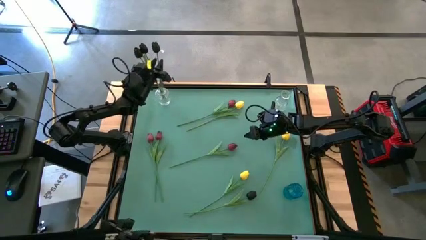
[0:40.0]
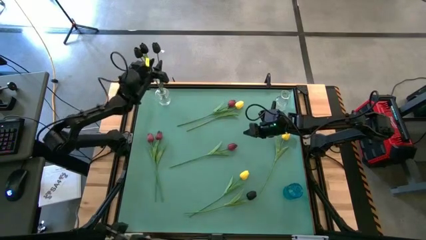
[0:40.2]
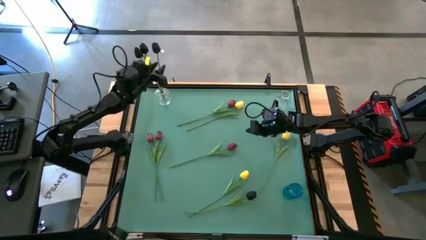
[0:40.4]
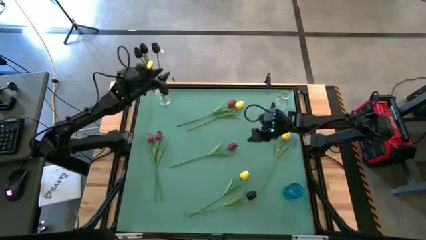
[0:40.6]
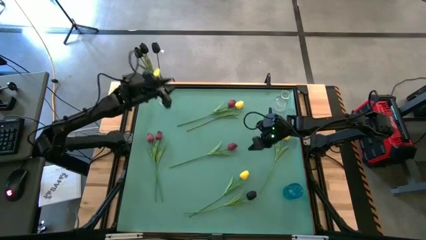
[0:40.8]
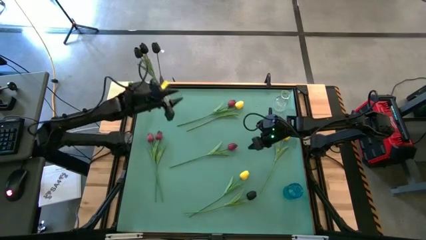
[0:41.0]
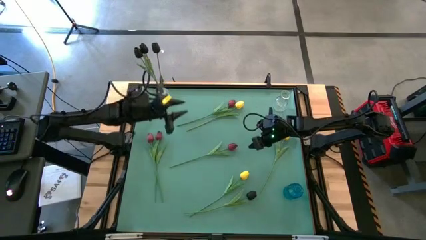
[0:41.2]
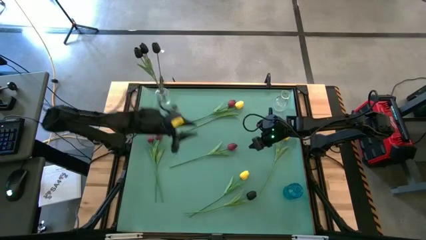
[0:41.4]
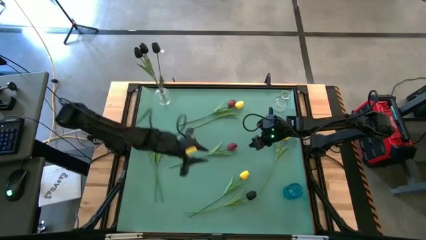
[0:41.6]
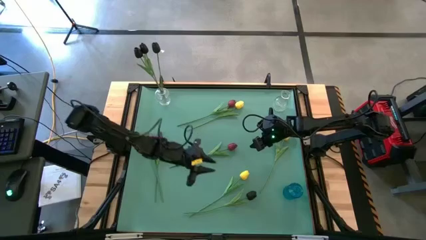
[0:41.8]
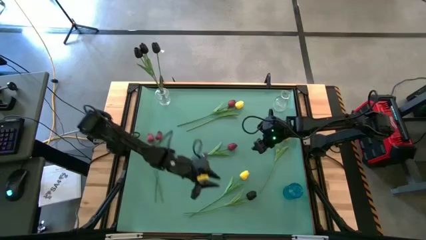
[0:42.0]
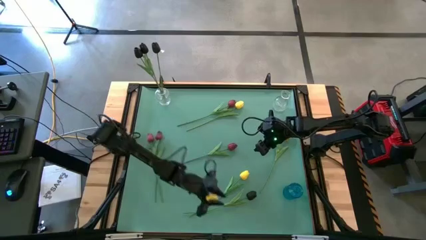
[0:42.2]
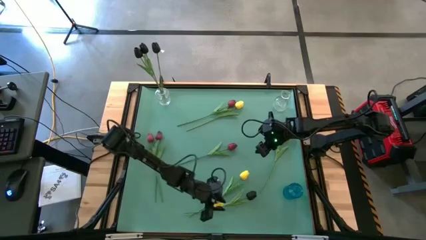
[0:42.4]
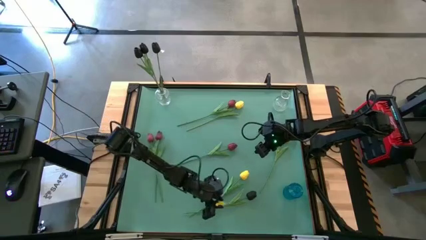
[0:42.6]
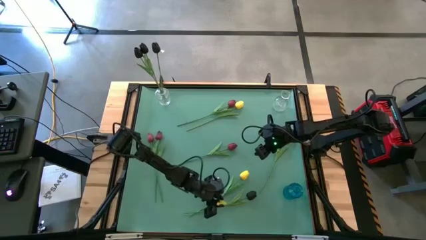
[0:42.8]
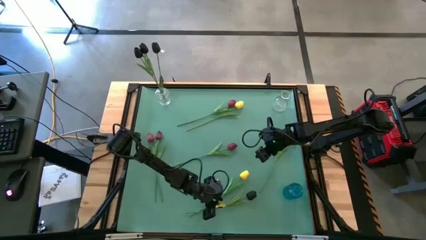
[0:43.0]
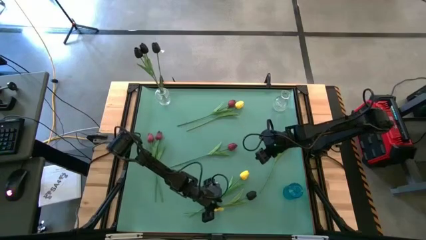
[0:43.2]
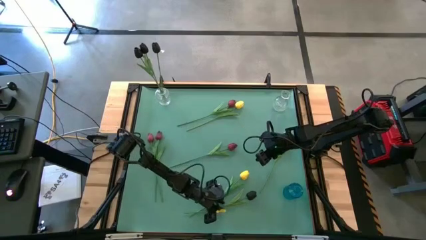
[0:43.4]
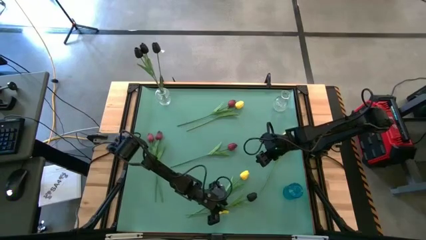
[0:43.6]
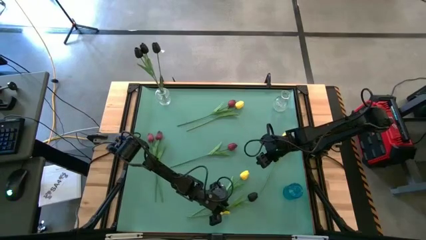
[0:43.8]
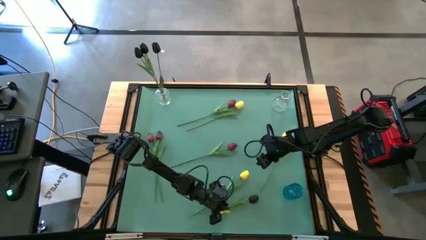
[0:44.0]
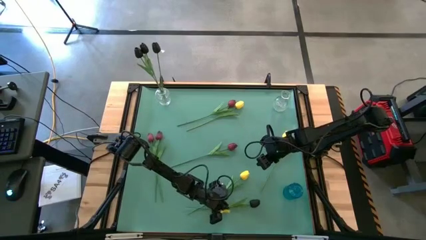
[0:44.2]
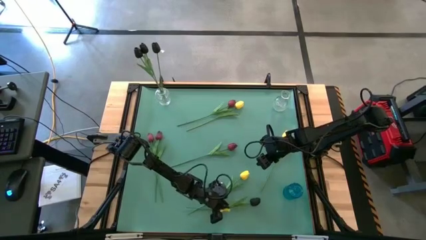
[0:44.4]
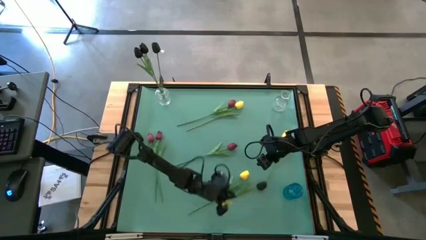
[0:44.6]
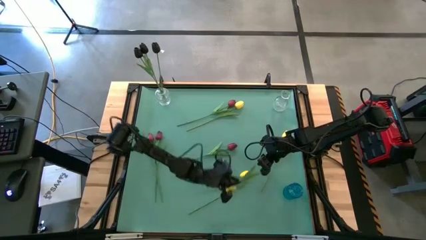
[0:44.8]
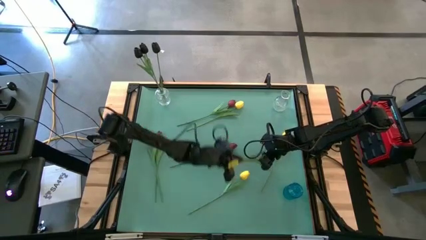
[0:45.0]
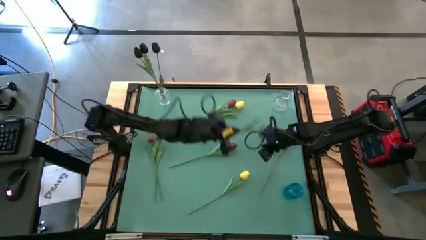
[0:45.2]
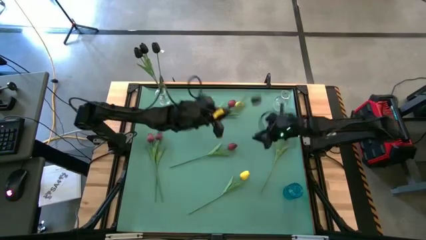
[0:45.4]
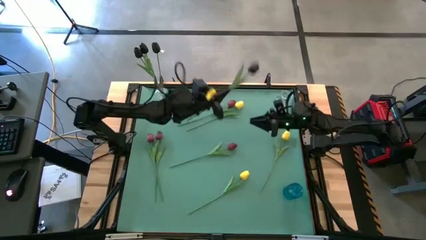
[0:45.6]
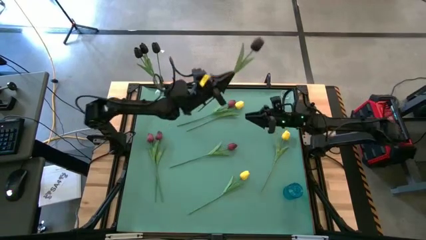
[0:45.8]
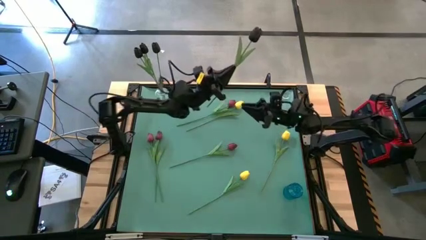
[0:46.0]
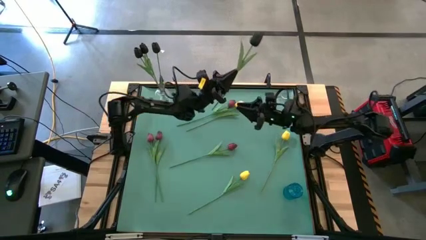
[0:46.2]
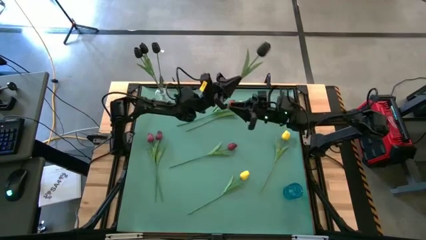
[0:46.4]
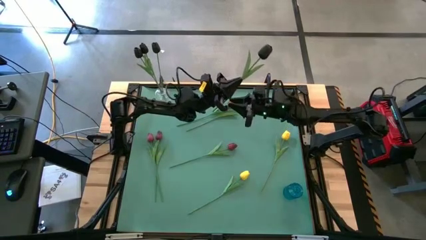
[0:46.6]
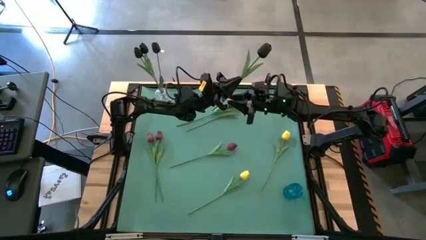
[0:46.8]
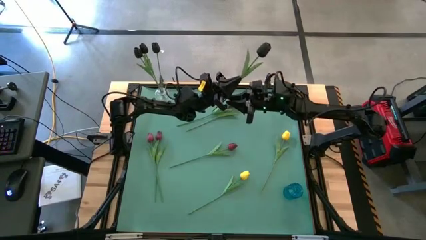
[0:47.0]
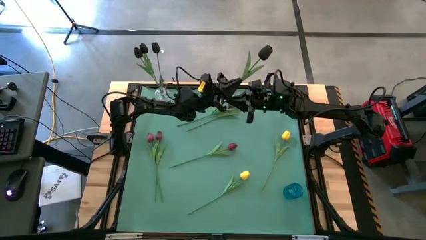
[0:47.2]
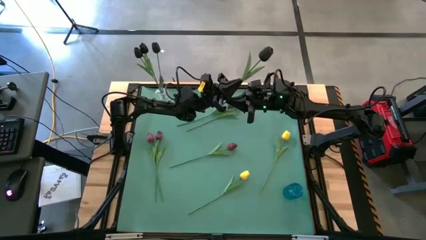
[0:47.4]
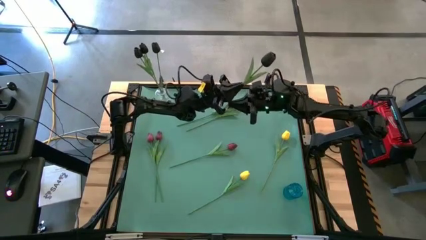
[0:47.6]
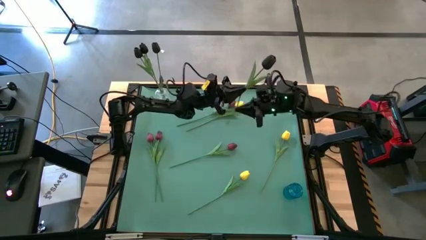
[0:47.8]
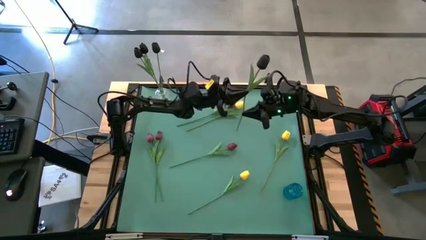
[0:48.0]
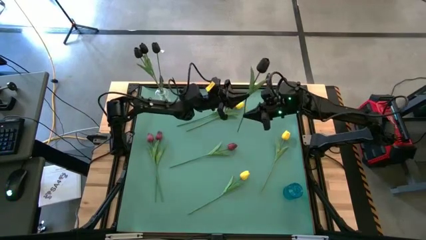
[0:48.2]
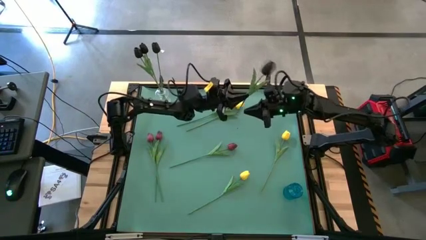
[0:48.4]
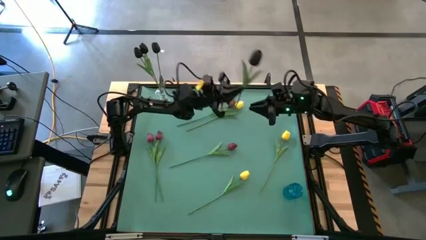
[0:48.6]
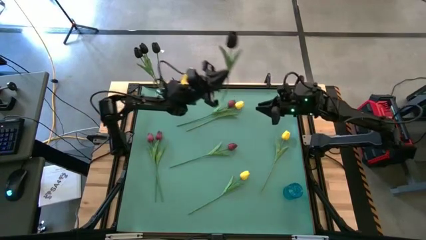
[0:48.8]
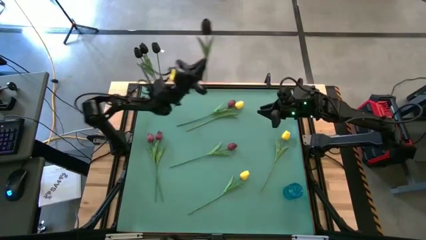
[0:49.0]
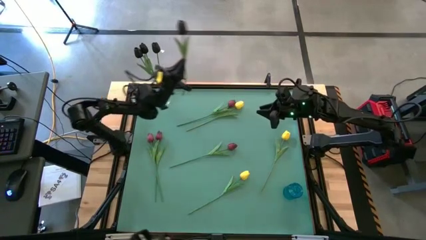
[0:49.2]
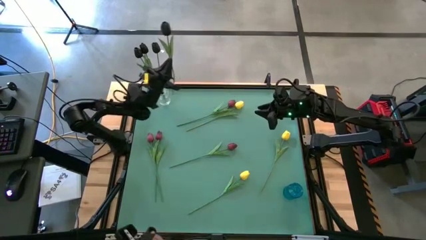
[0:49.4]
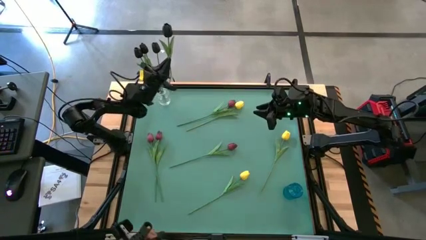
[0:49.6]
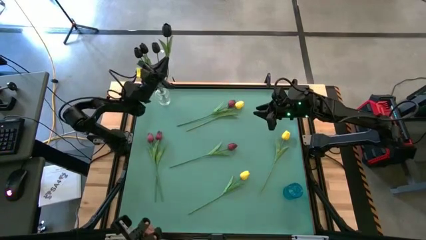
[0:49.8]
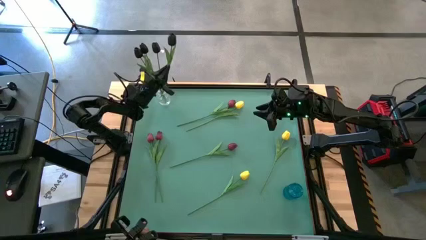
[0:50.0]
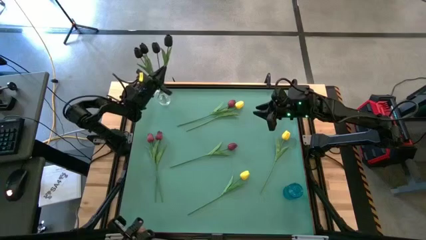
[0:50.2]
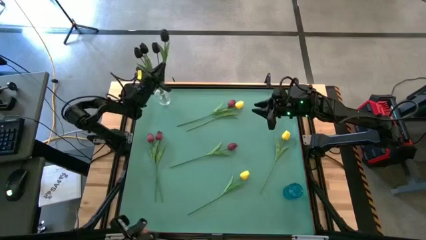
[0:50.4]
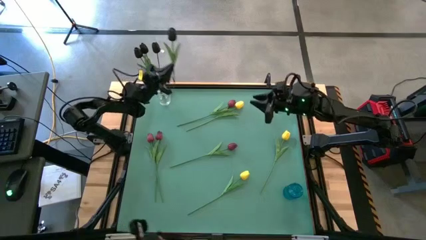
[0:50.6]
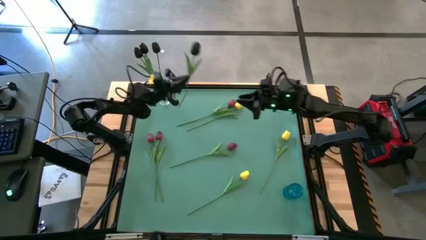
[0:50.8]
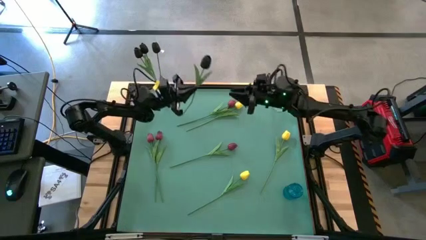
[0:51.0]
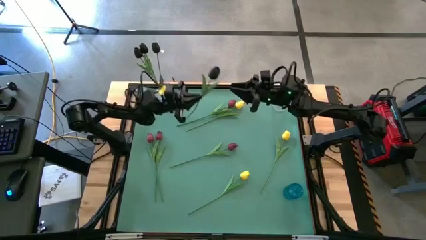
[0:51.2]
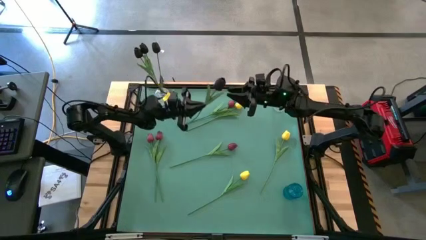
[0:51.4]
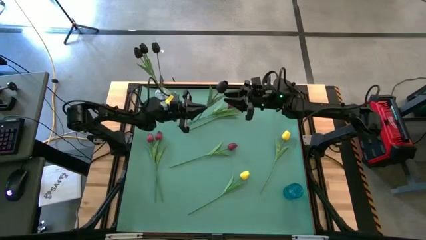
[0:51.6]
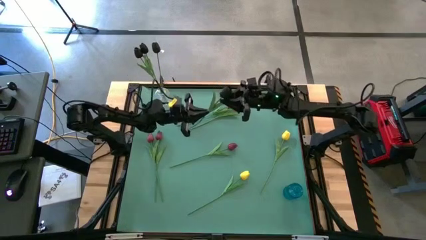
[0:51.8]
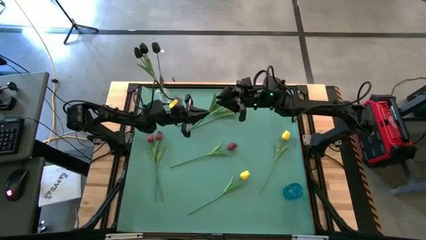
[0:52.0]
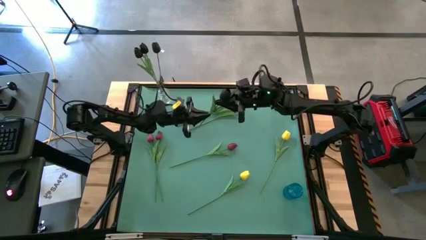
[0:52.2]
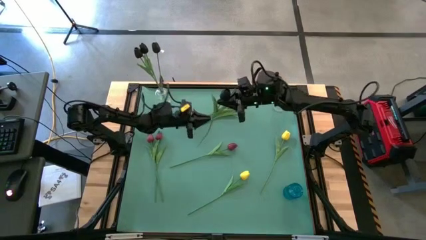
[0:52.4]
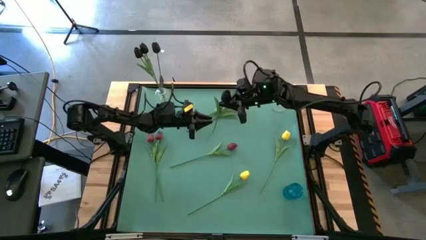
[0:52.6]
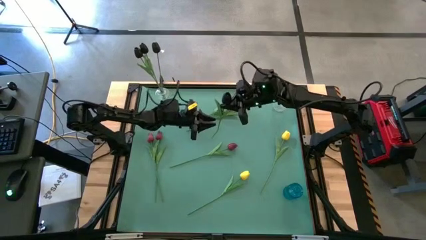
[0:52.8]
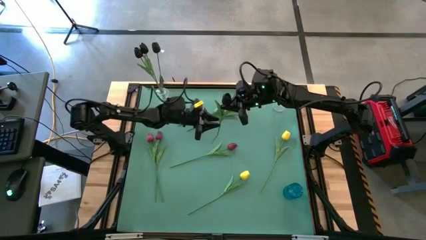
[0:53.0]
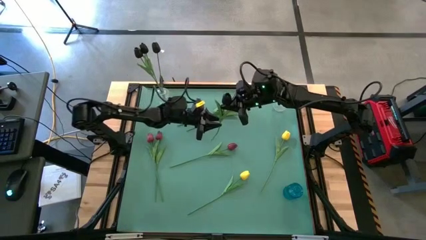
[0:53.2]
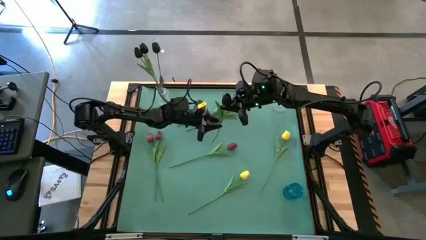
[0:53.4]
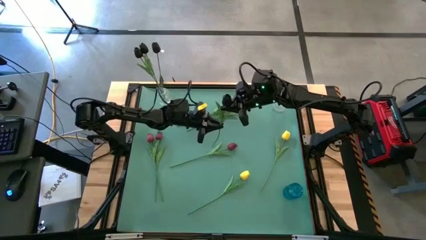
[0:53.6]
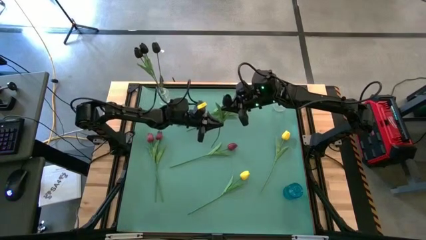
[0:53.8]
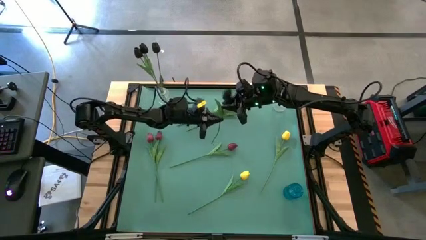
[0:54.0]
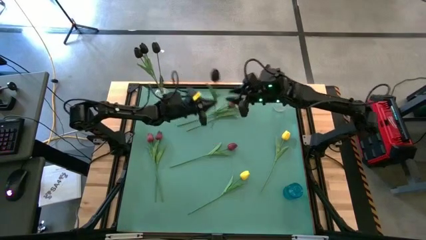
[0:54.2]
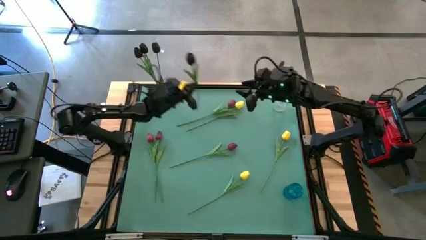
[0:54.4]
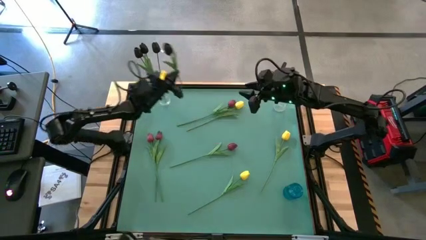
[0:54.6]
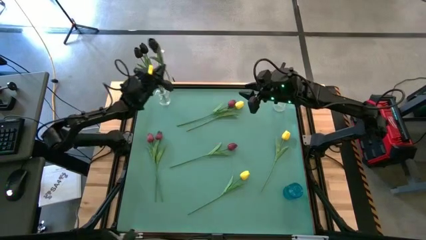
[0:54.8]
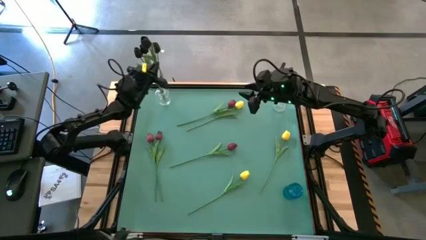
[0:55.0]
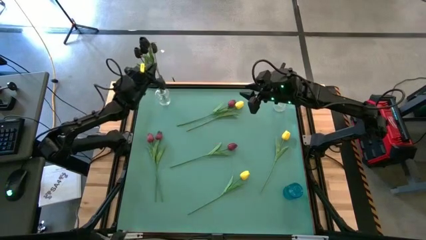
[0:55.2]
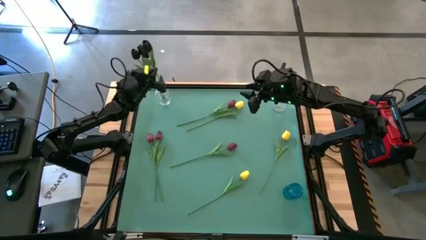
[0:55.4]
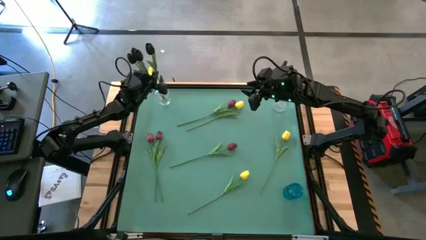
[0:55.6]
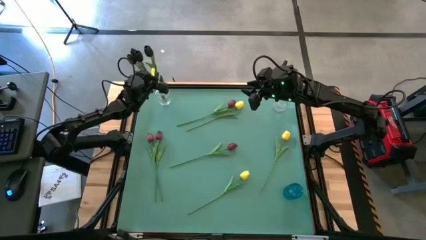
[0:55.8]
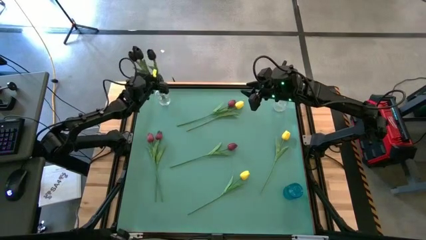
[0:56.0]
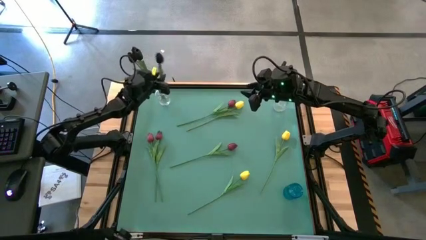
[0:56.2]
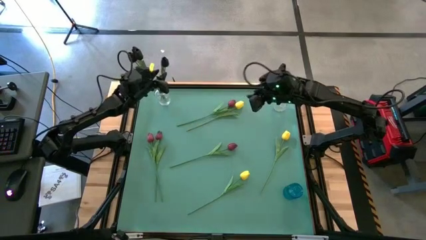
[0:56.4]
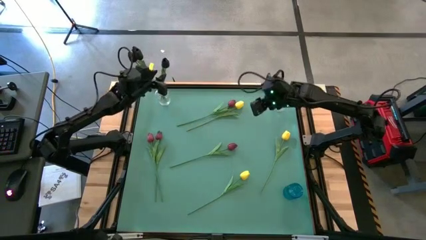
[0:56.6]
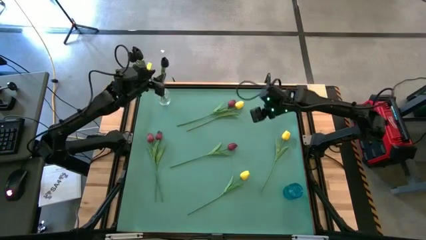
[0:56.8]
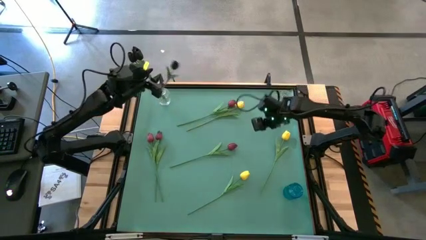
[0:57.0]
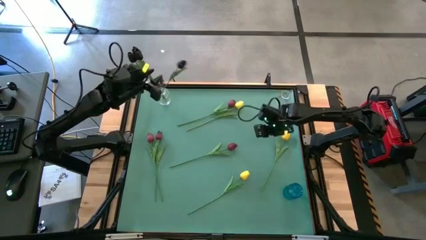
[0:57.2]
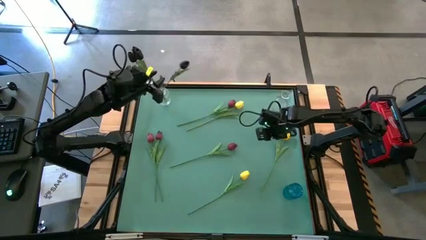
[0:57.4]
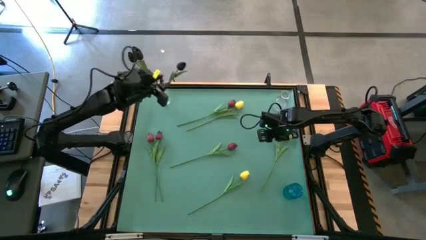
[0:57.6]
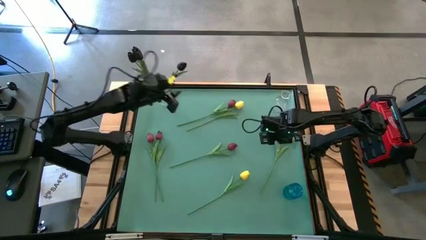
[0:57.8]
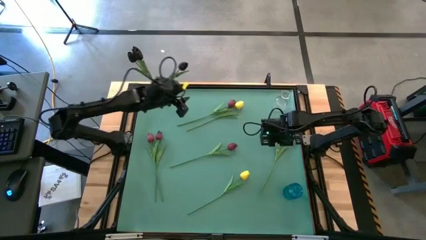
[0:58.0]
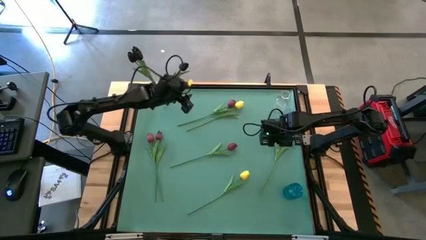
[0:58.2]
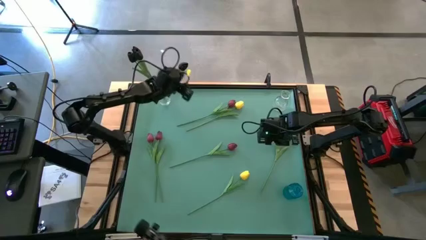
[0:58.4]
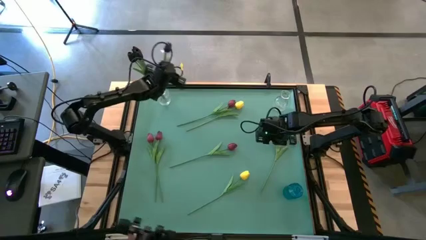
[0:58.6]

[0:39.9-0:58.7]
Task: Sort flowers into vase by color
Put the black flower into the left transparent vase
